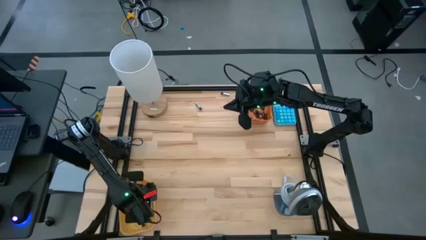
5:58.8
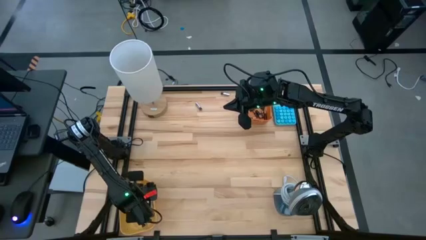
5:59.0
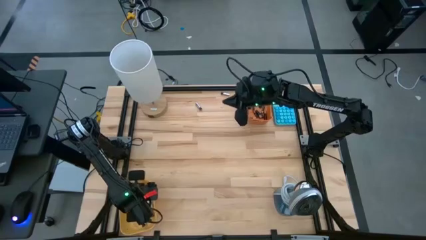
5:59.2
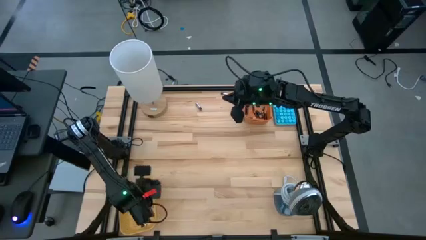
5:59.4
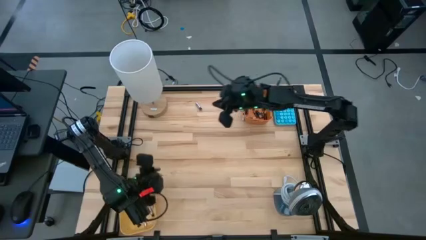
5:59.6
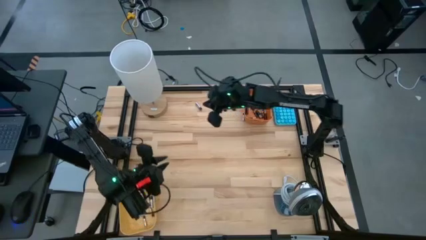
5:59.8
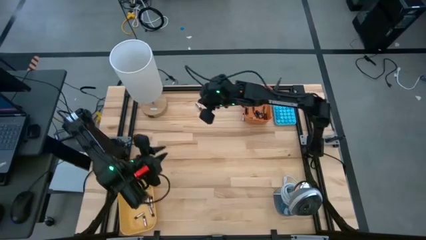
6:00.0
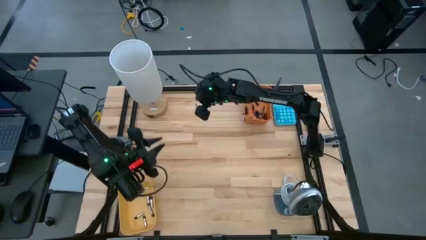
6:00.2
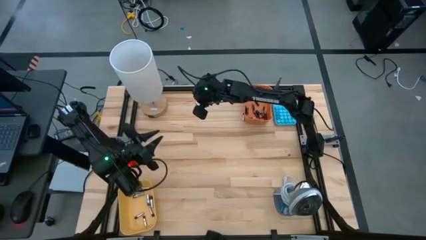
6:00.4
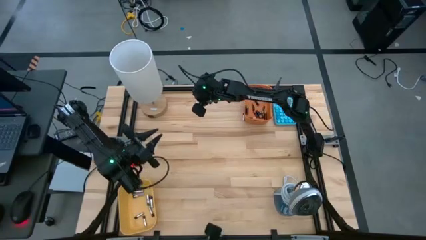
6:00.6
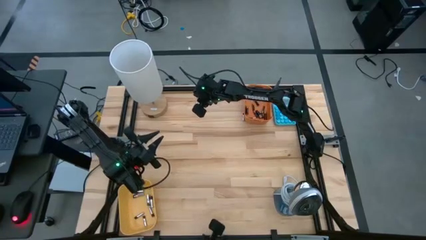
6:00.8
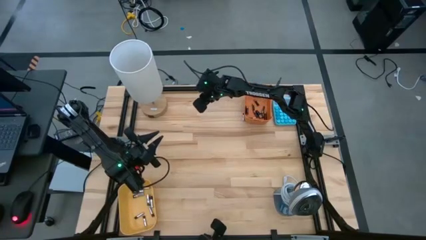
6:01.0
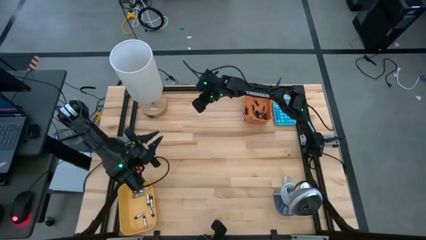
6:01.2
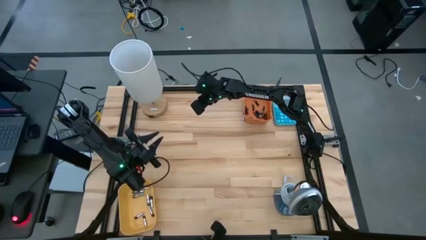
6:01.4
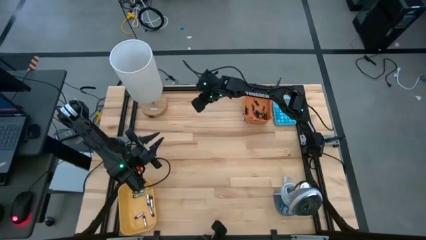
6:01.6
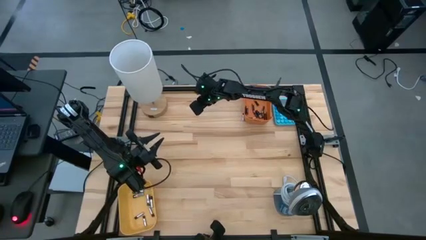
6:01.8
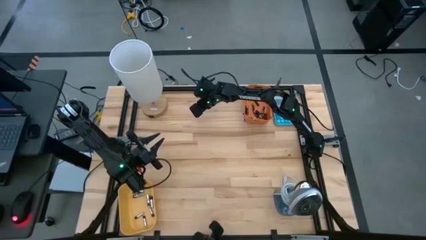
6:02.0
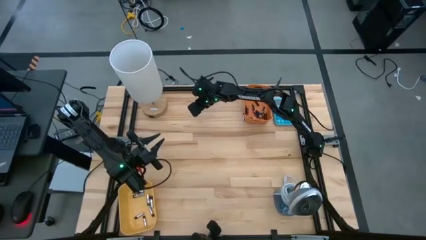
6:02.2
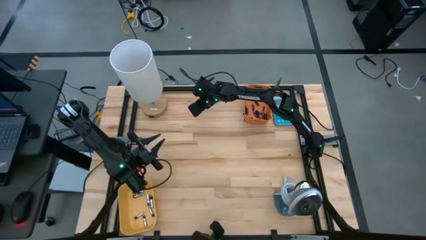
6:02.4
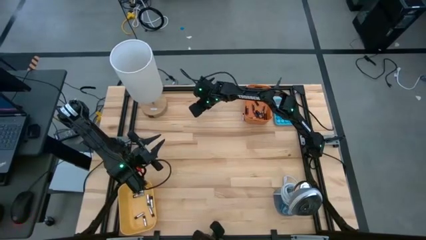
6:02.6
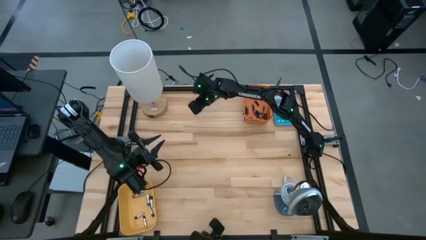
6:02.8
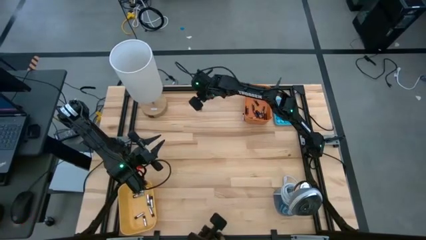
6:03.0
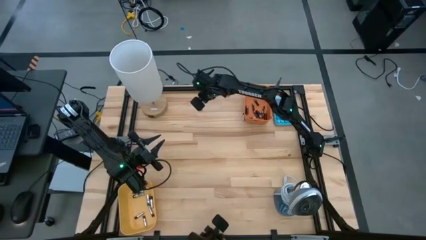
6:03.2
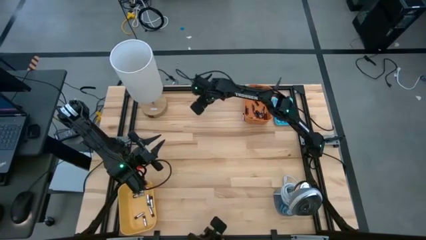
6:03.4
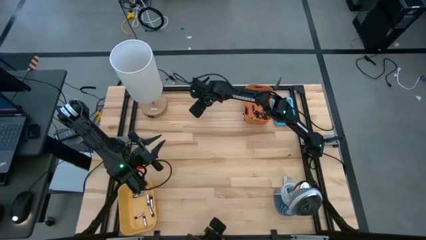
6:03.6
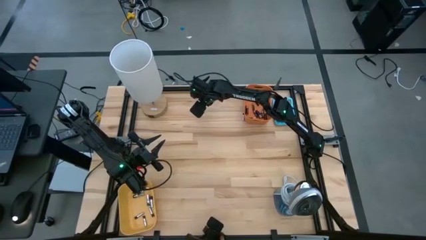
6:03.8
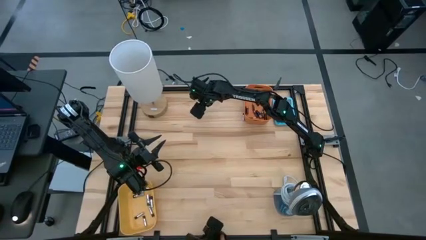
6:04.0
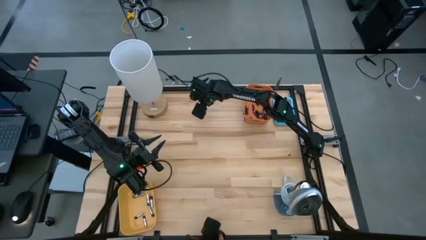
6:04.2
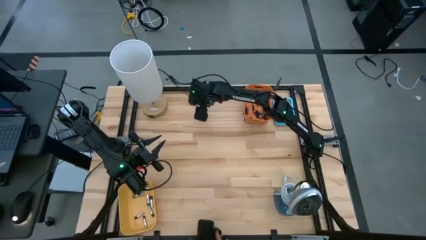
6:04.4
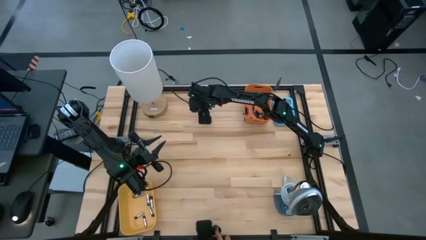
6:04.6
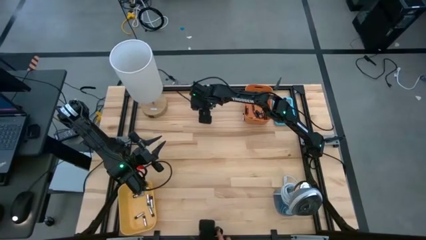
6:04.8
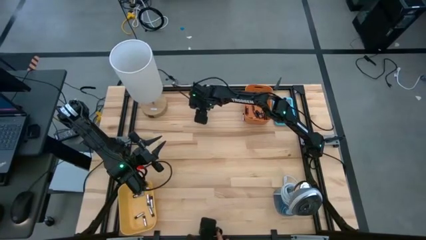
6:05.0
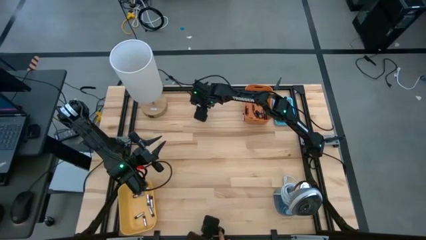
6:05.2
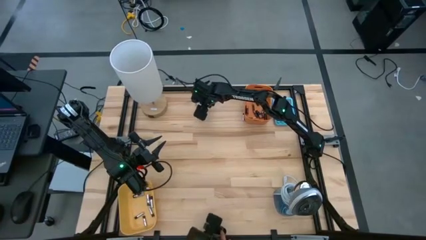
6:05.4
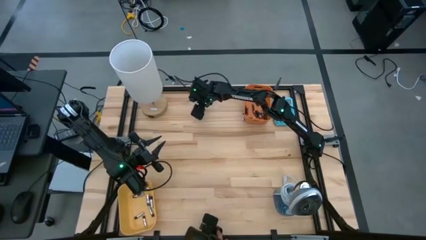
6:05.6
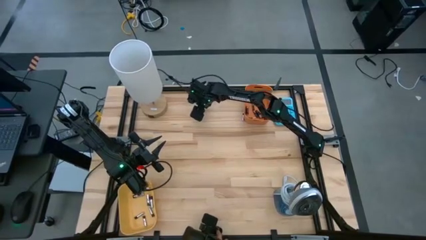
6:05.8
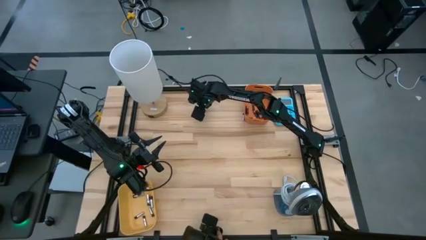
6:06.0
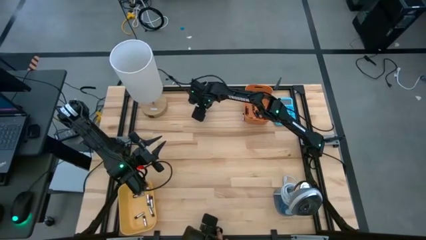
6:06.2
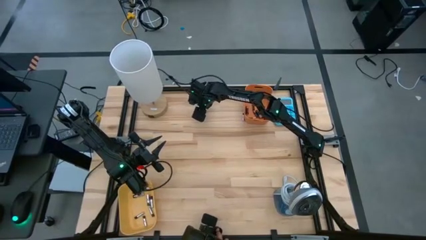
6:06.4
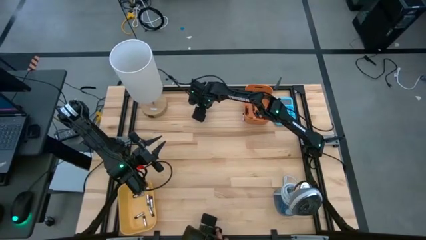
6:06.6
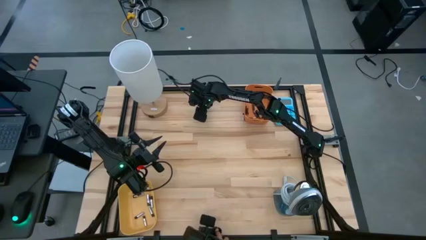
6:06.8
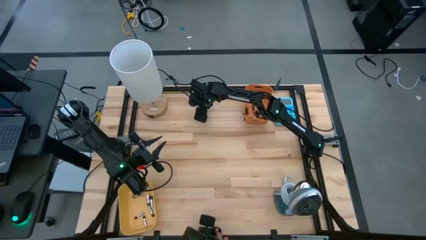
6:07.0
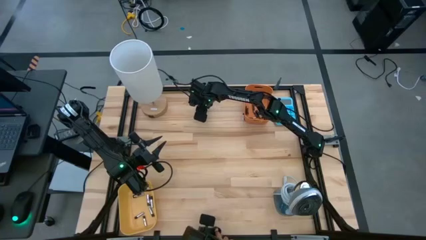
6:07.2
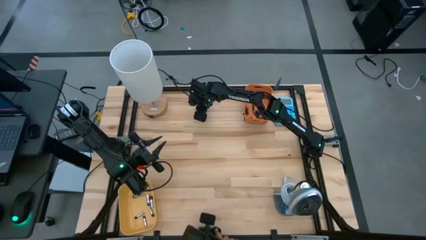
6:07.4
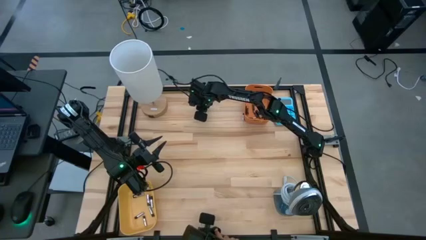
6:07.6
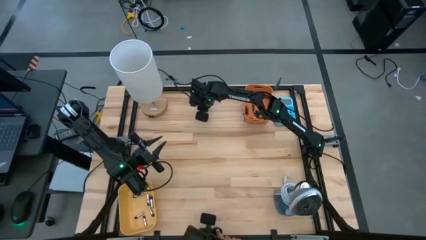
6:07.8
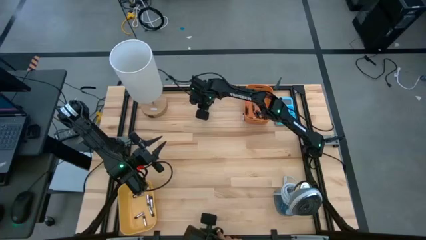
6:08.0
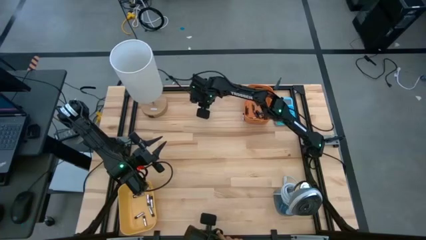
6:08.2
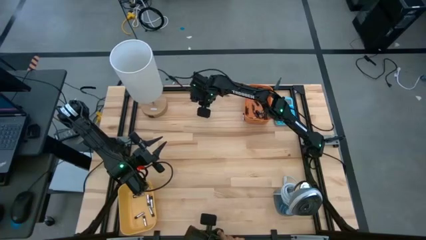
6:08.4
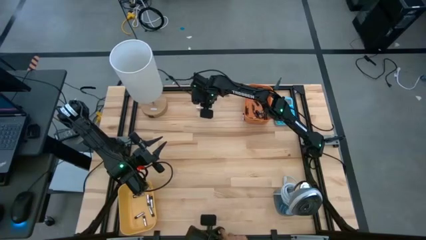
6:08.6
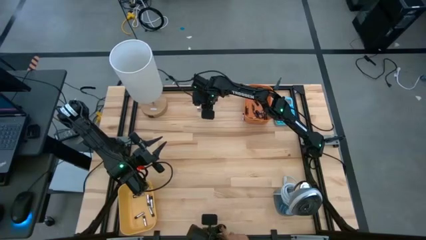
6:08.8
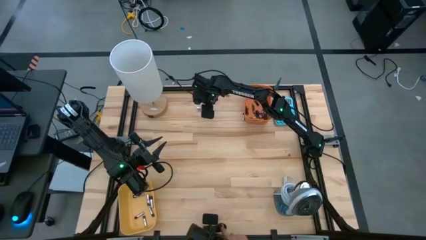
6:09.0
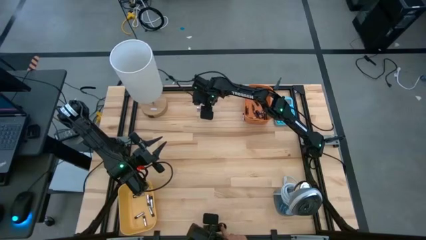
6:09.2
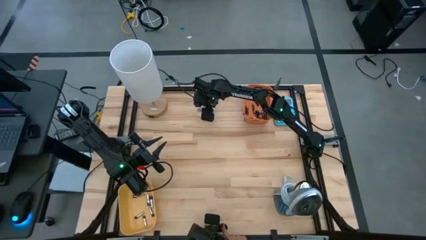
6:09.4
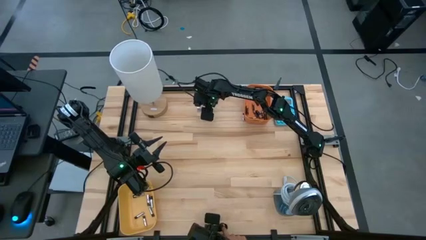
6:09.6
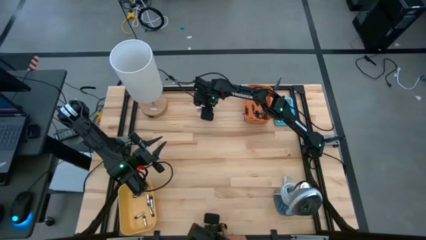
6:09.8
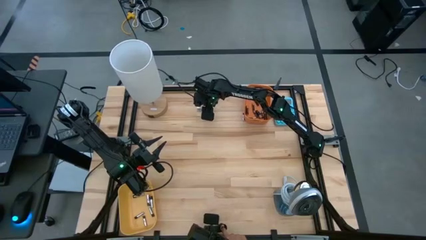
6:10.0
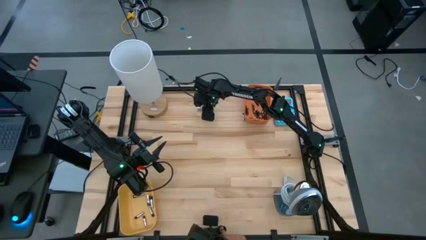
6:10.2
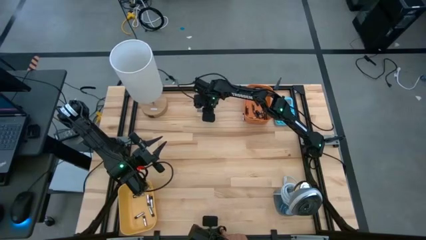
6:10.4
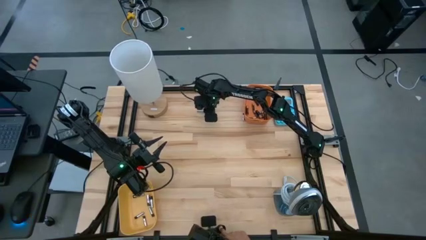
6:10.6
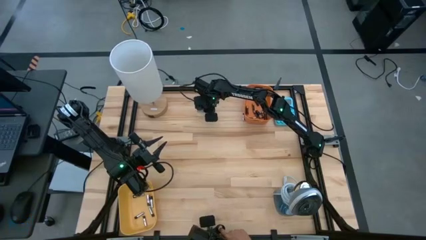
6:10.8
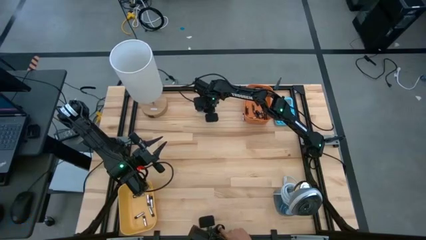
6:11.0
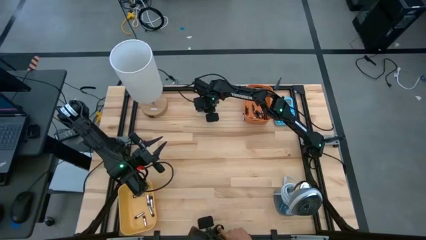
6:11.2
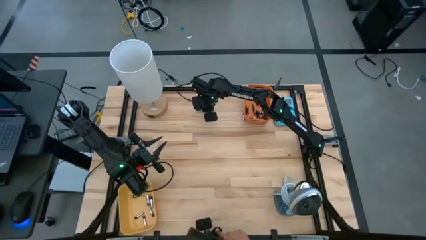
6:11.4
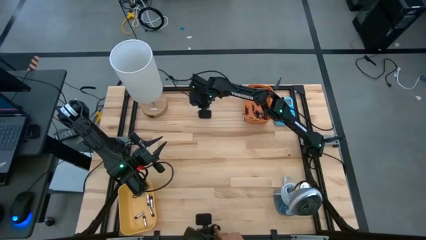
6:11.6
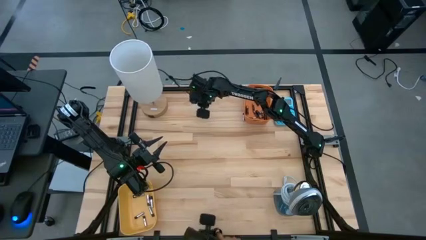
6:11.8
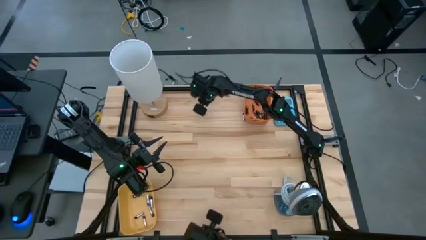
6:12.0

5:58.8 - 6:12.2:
Task: Sort batteries
Put the silver battery into the yellow bin
